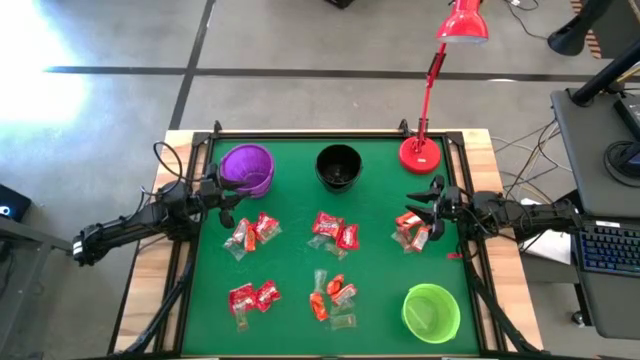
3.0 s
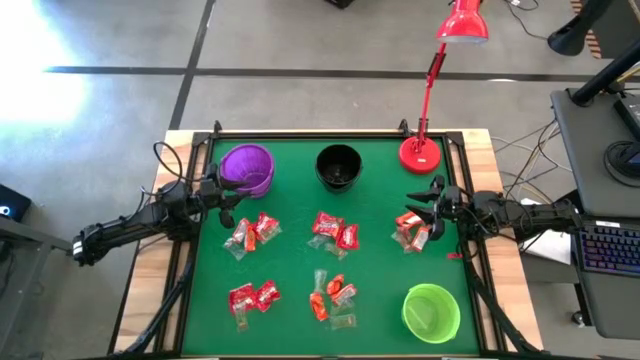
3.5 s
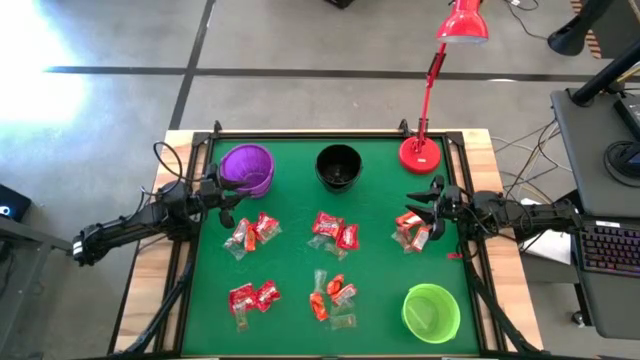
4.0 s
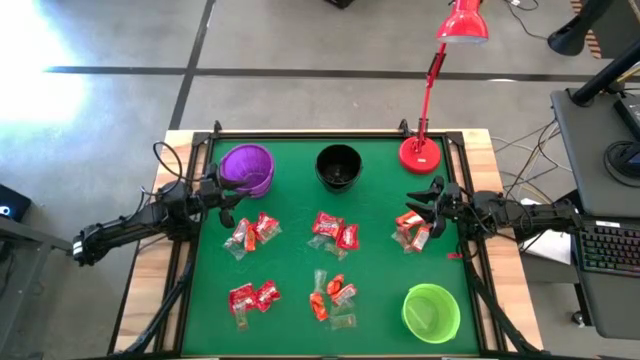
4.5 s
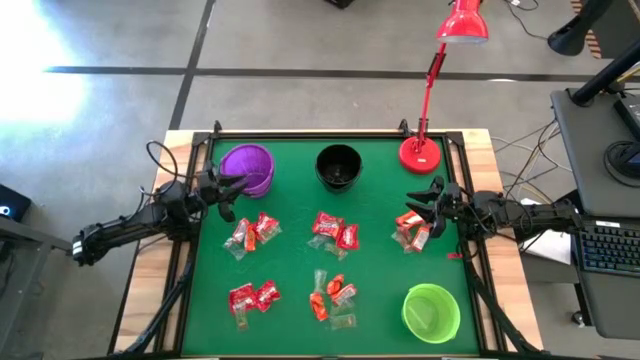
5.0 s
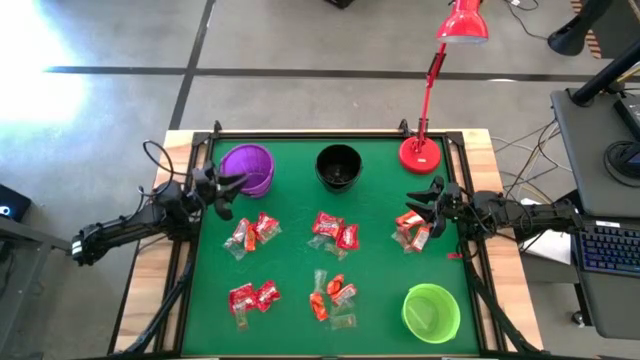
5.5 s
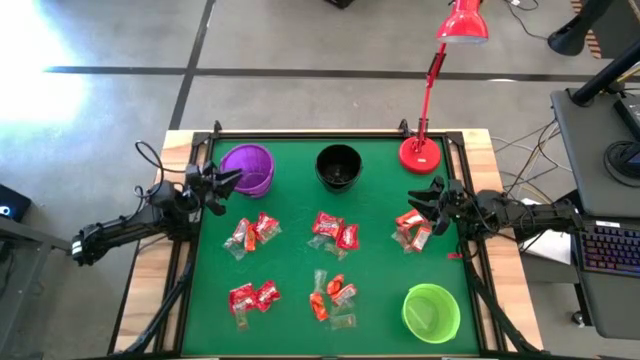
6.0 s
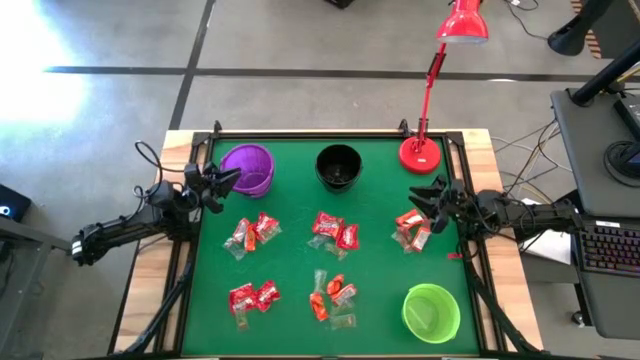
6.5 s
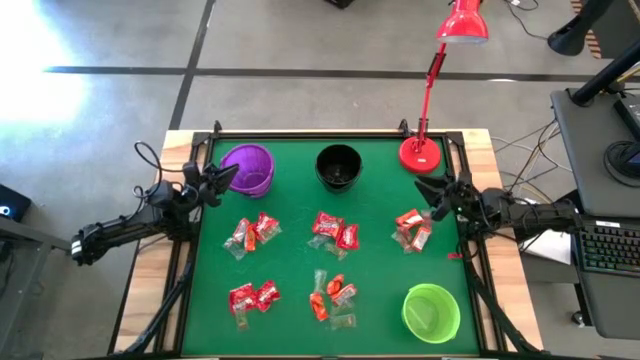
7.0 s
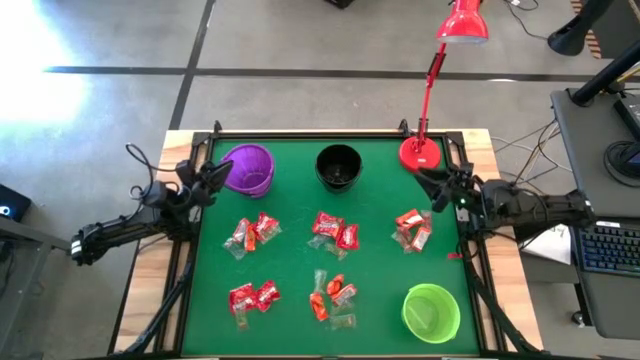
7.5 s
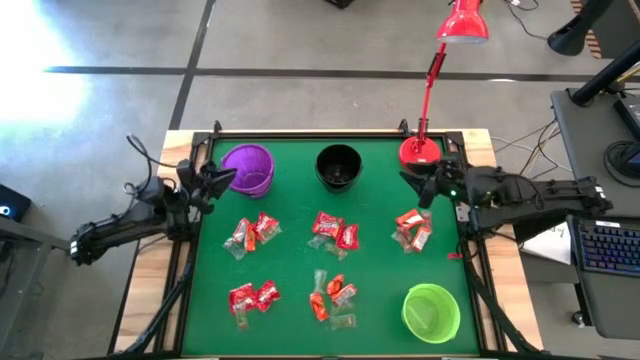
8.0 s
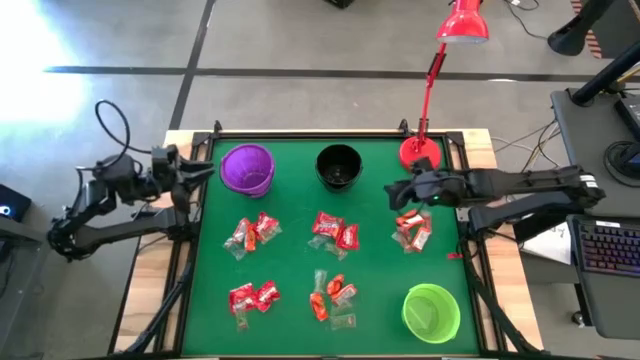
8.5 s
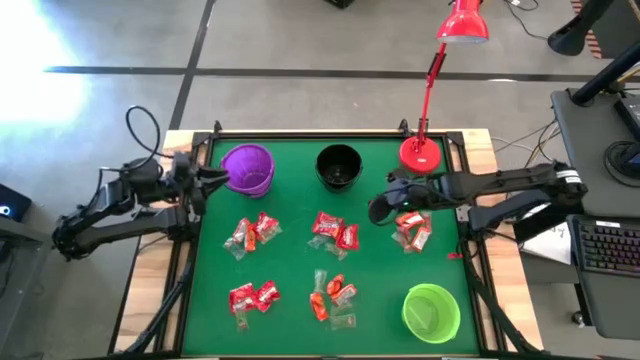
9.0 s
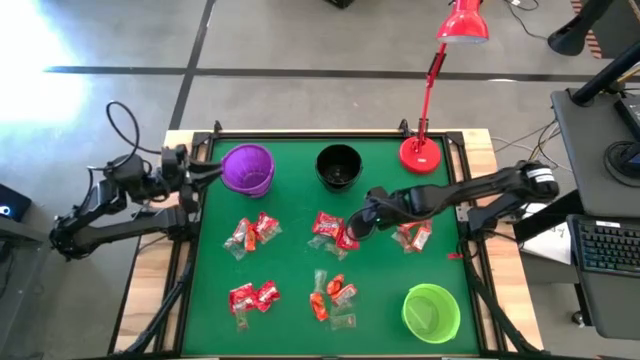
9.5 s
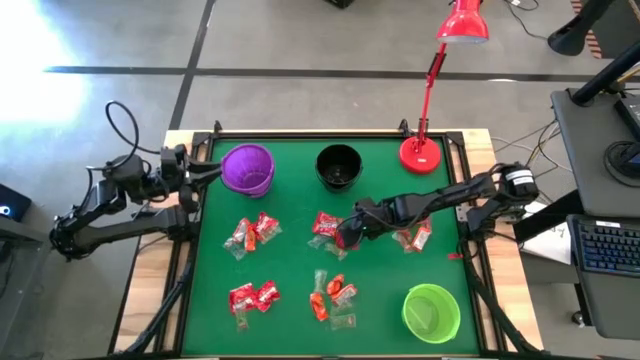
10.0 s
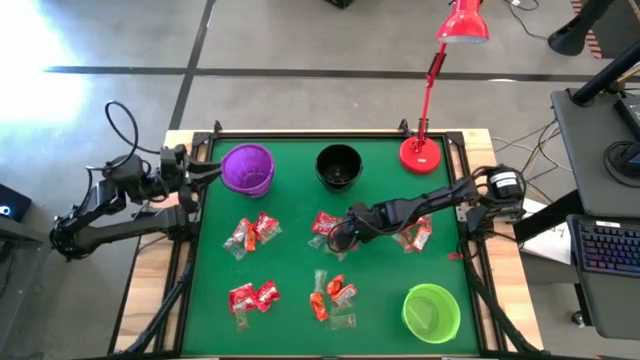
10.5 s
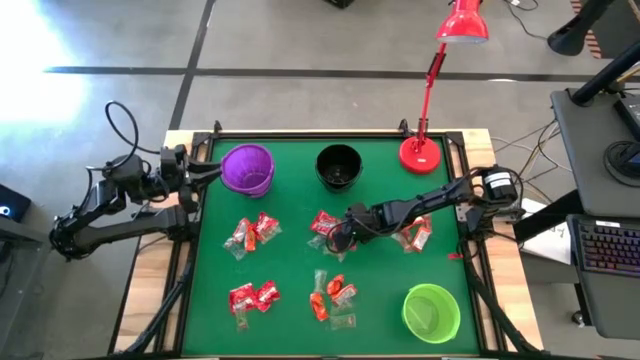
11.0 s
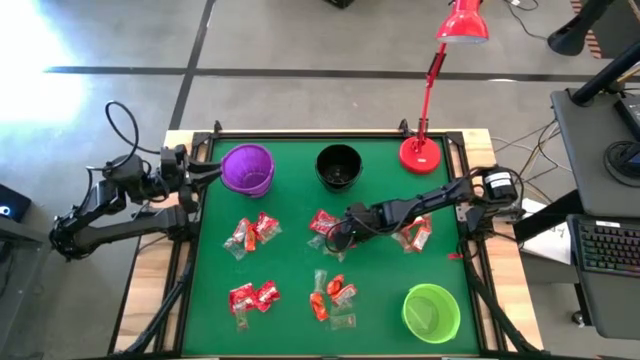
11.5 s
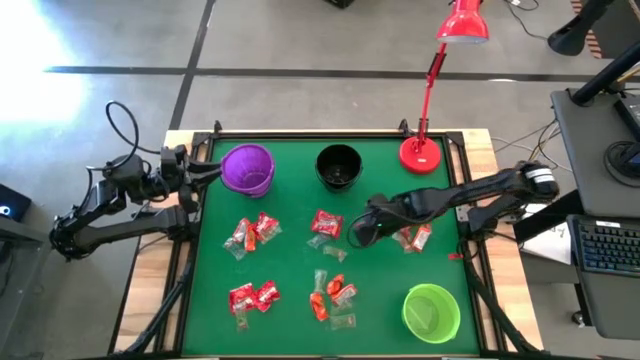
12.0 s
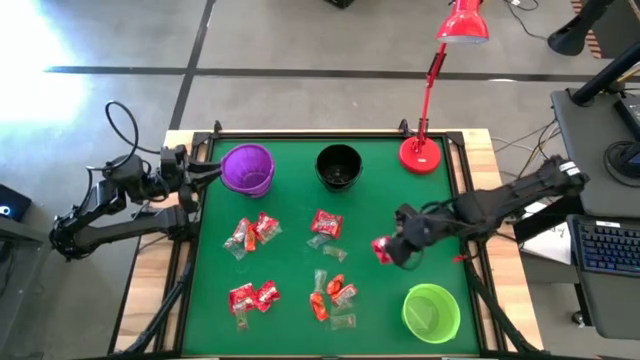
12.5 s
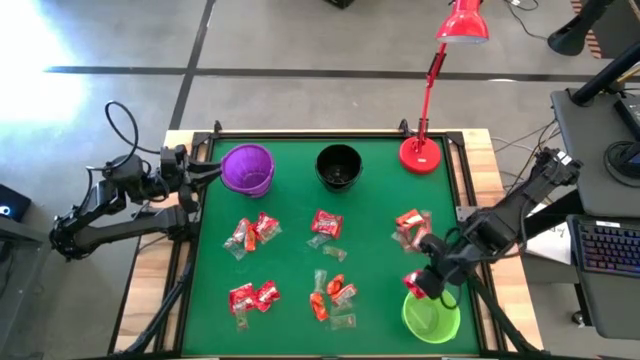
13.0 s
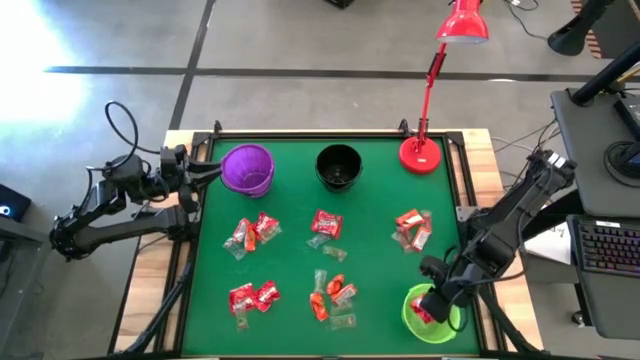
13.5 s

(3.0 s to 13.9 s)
Task: Sort candy
Put the red candy into the green bucket

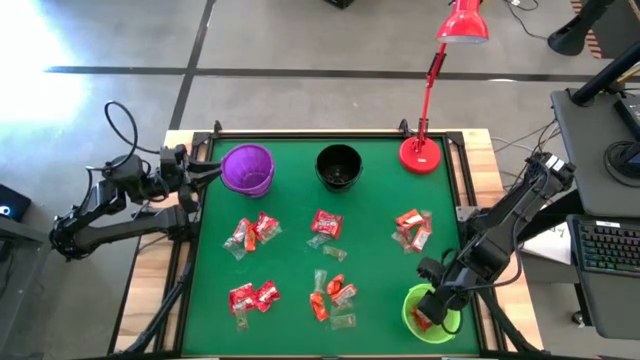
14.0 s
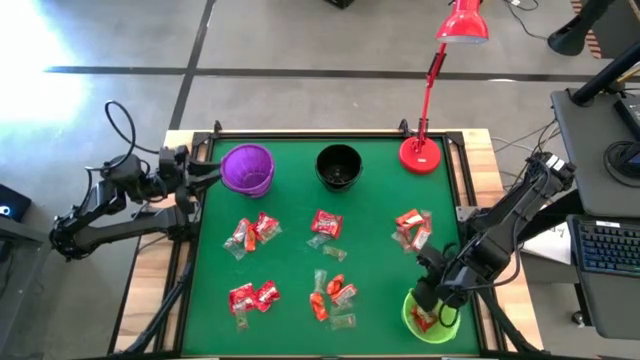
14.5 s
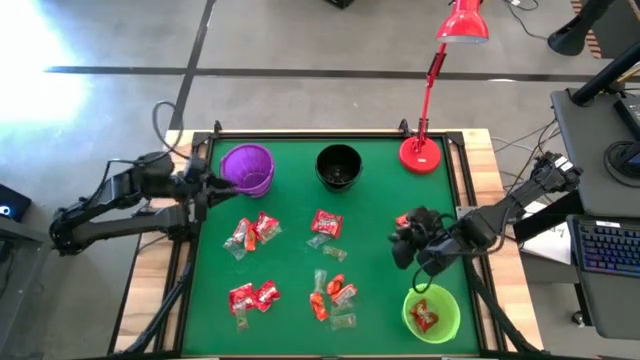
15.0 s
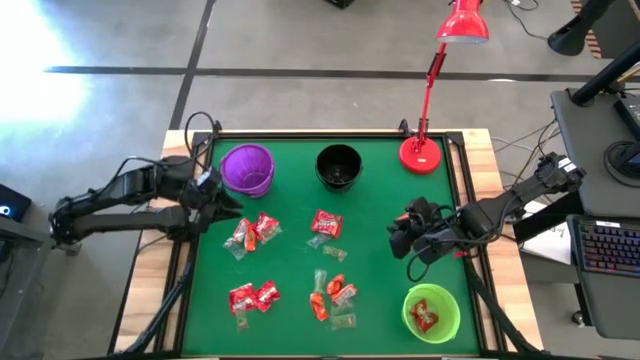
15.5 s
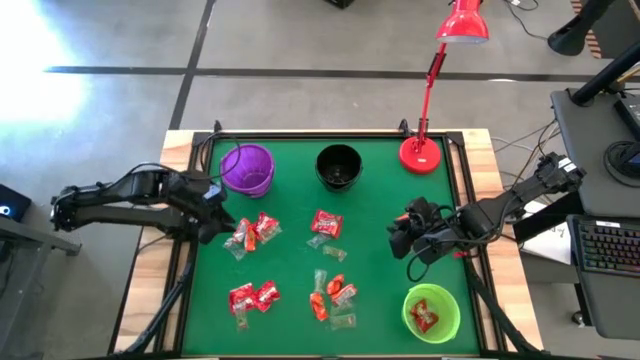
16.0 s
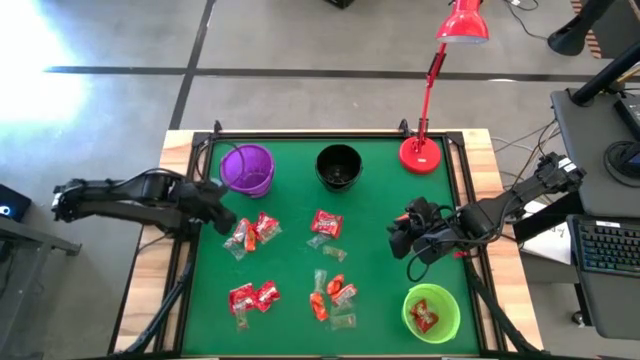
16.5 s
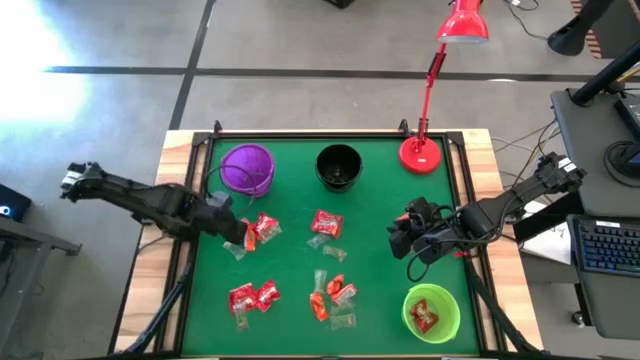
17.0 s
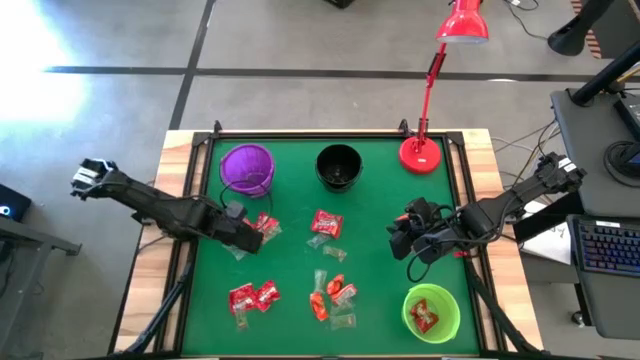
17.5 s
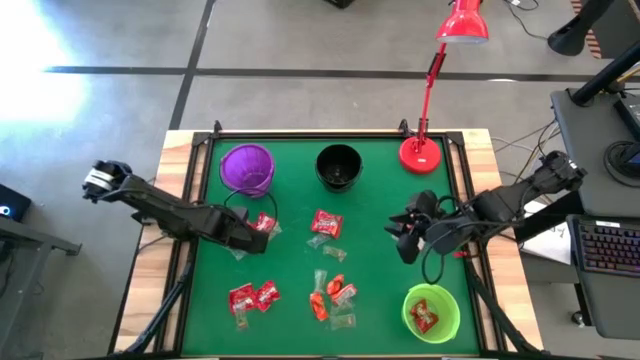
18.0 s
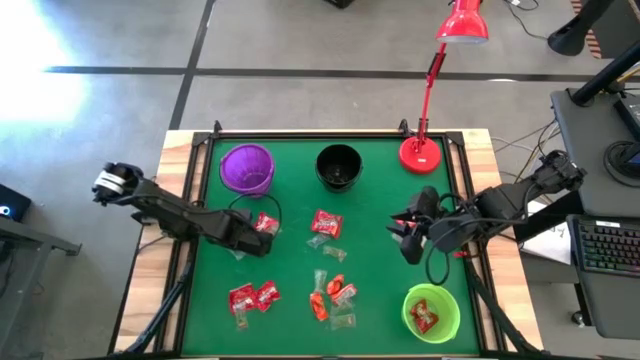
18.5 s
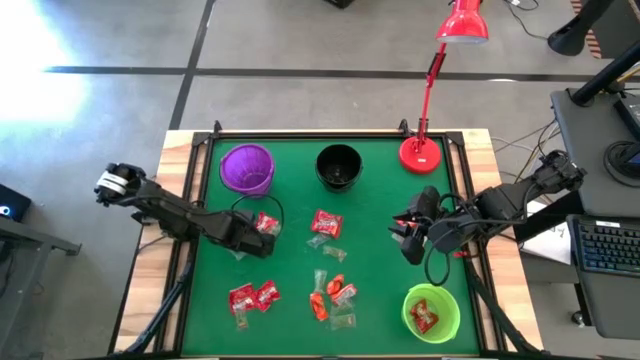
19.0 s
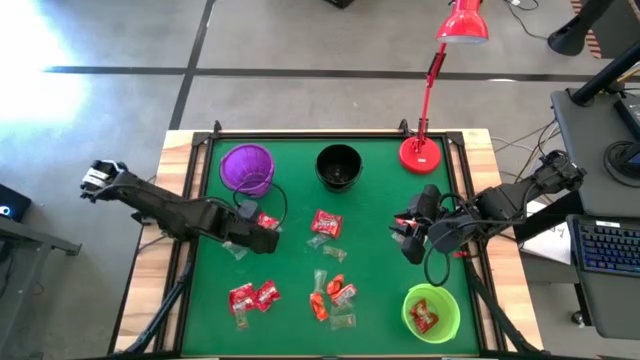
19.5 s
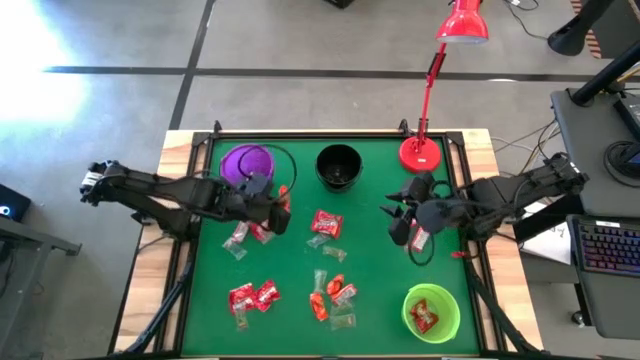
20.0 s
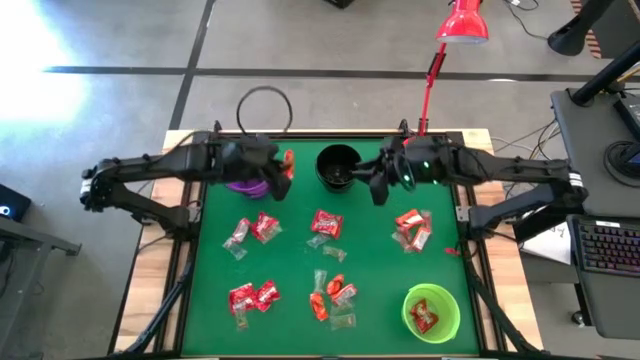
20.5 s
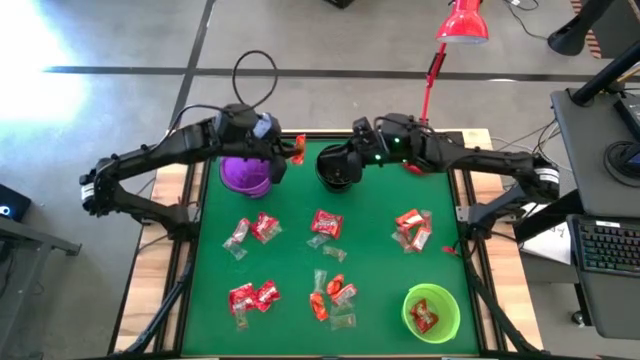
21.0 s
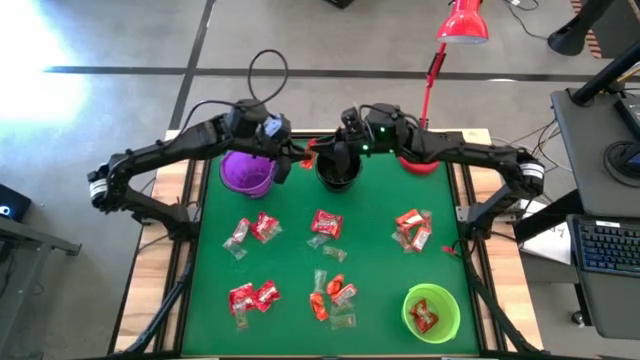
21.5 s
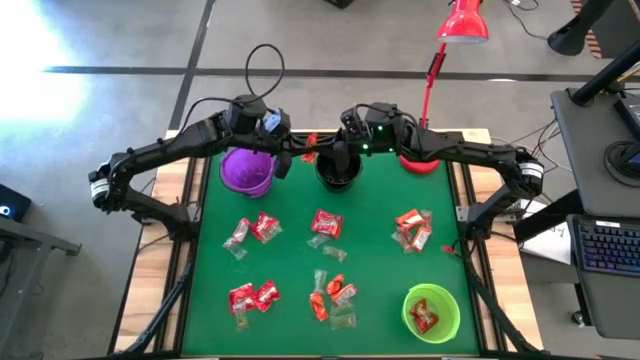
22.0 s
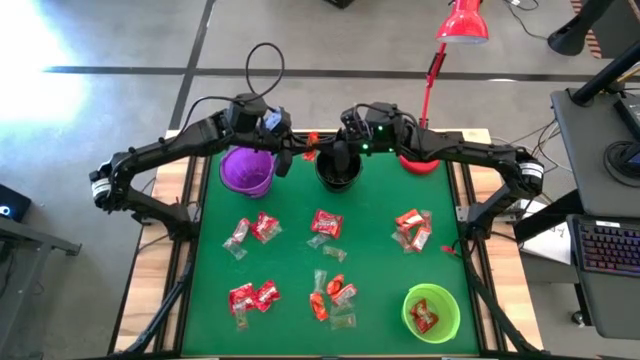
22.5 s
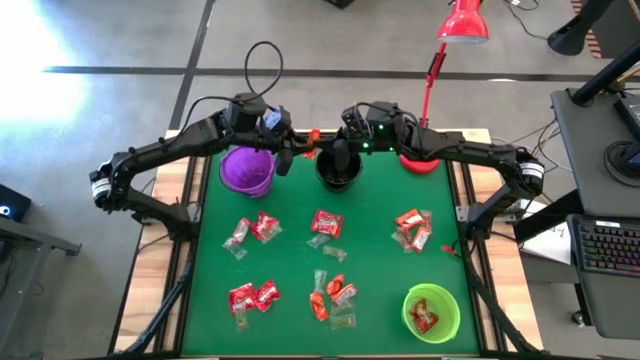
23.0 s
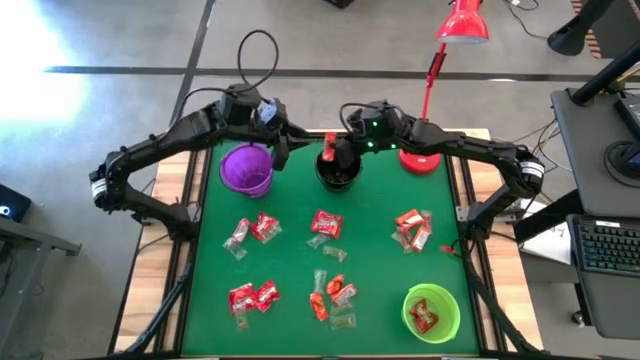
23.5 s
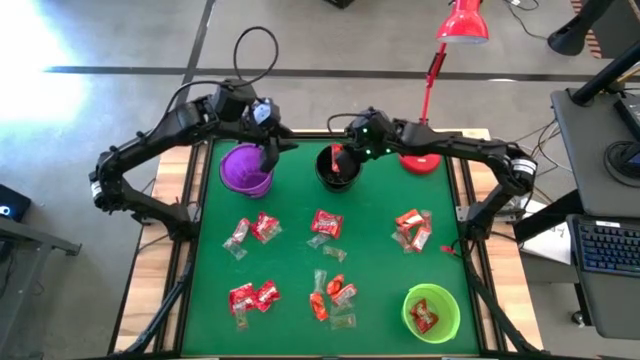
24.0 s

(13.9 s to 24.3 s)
Put the orange chocolate into the black bucket
